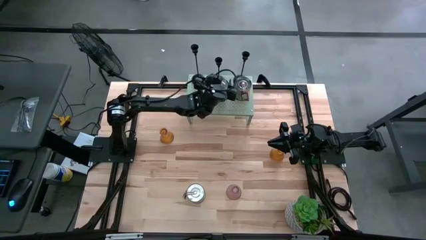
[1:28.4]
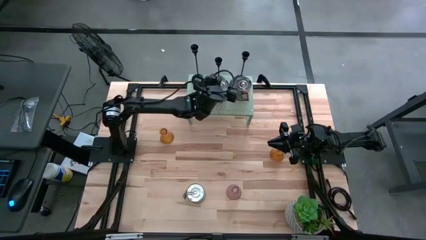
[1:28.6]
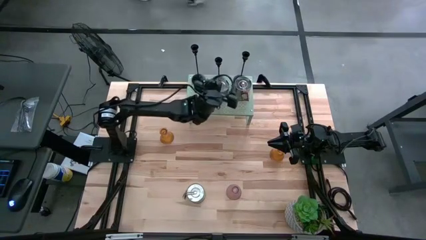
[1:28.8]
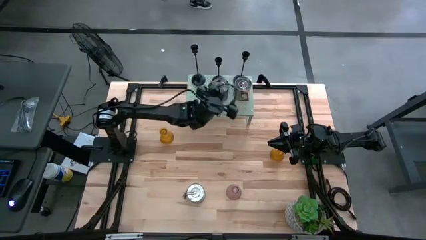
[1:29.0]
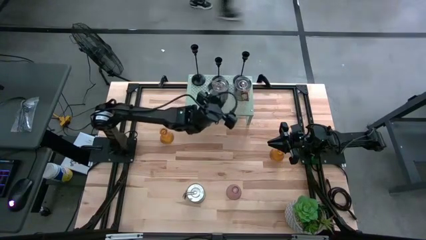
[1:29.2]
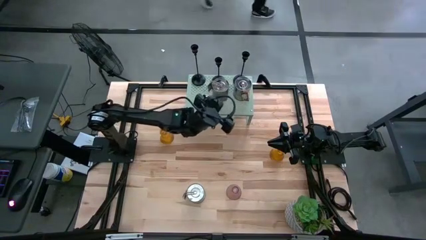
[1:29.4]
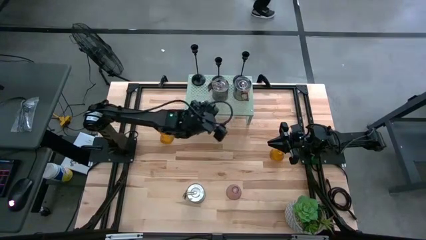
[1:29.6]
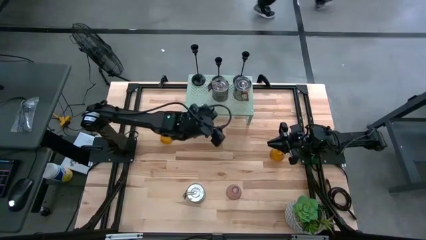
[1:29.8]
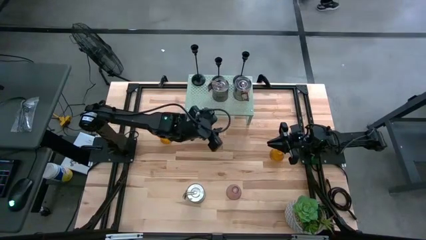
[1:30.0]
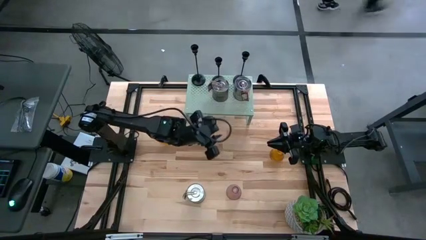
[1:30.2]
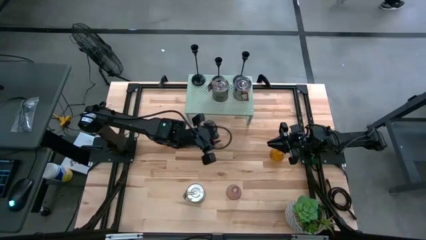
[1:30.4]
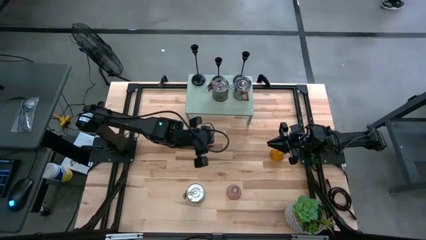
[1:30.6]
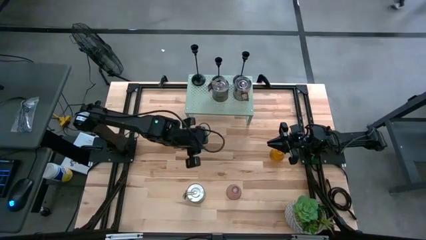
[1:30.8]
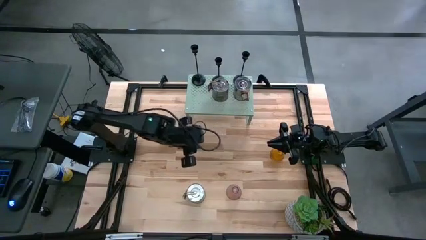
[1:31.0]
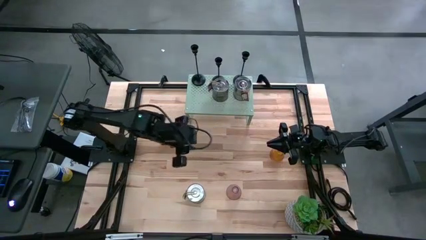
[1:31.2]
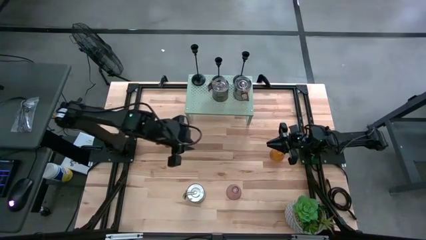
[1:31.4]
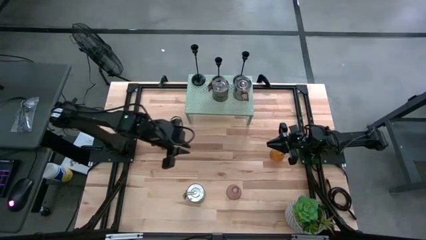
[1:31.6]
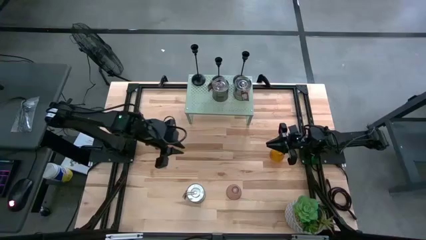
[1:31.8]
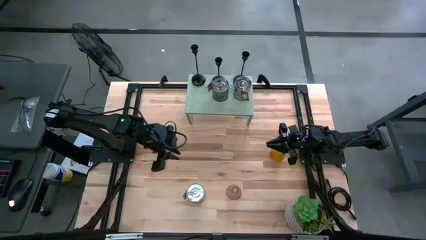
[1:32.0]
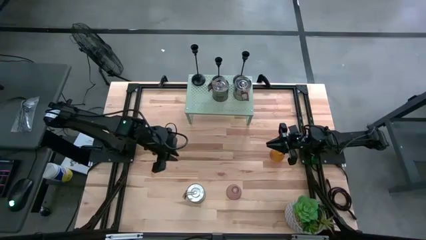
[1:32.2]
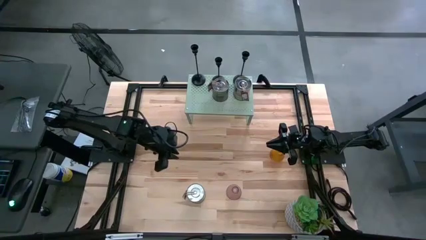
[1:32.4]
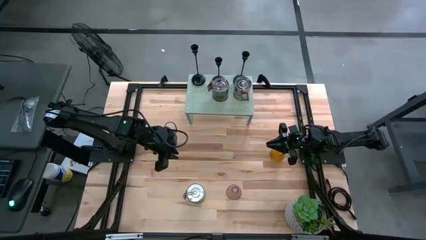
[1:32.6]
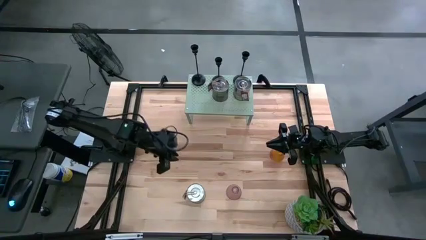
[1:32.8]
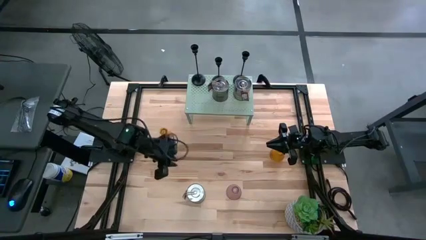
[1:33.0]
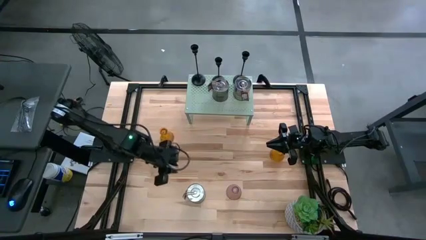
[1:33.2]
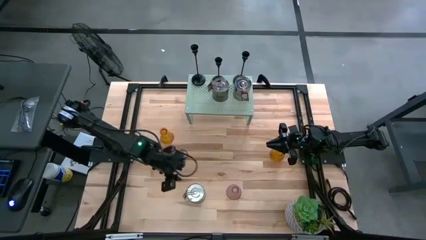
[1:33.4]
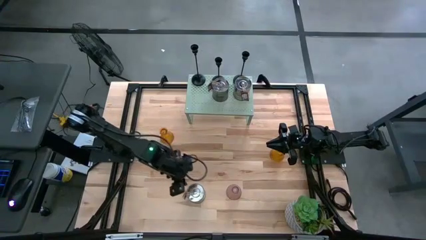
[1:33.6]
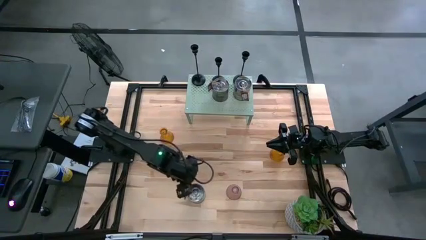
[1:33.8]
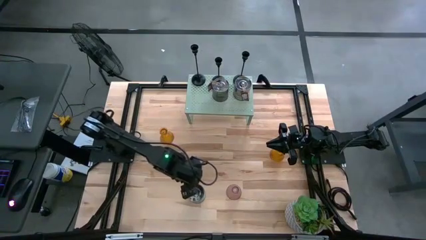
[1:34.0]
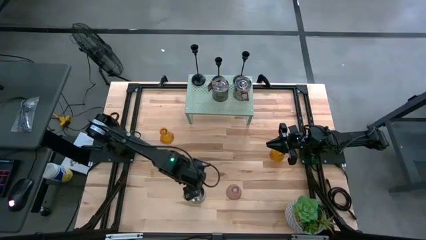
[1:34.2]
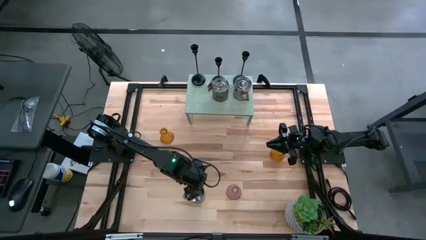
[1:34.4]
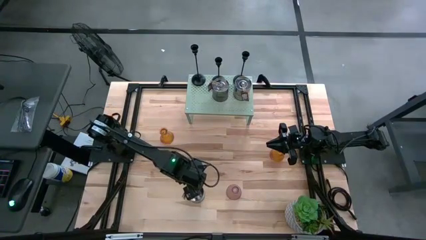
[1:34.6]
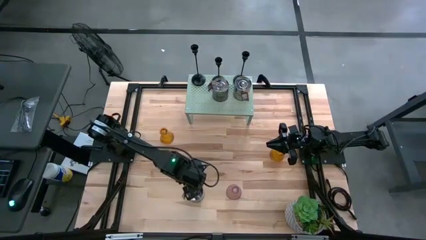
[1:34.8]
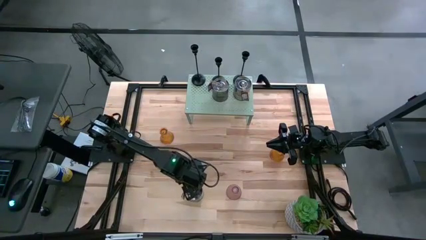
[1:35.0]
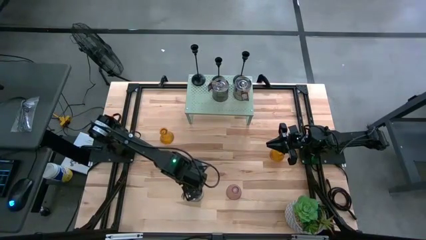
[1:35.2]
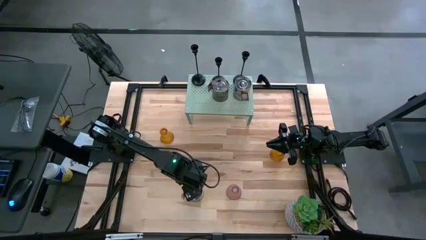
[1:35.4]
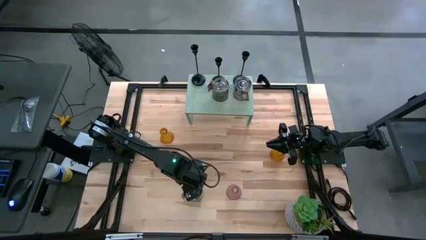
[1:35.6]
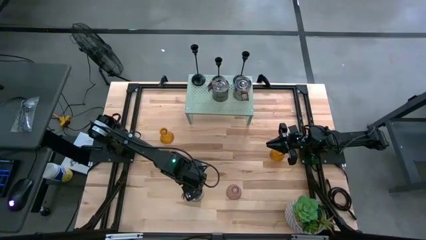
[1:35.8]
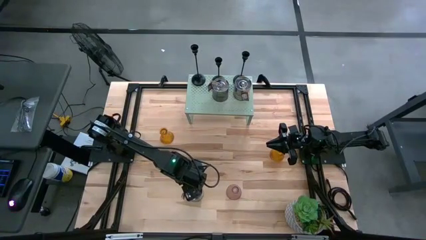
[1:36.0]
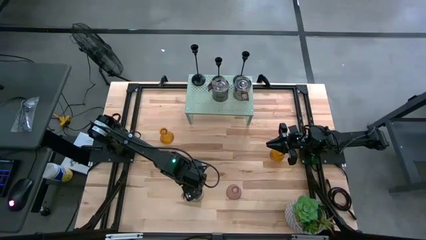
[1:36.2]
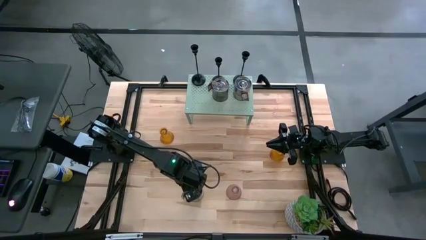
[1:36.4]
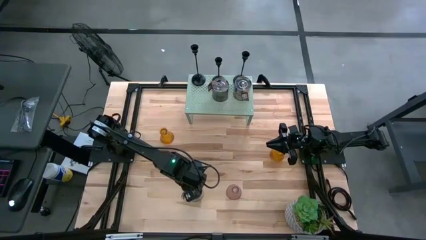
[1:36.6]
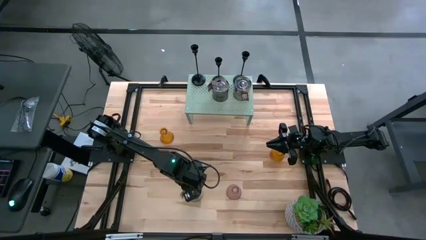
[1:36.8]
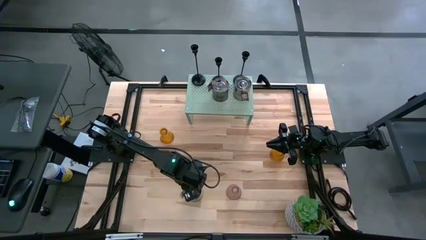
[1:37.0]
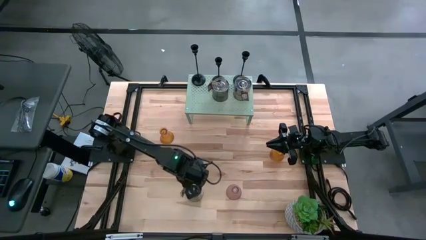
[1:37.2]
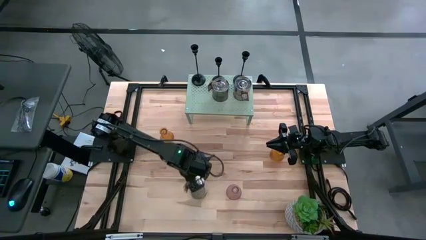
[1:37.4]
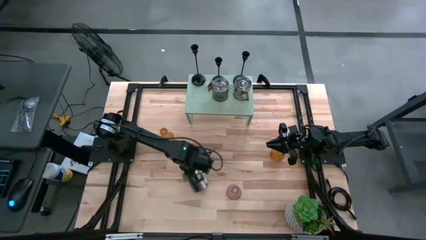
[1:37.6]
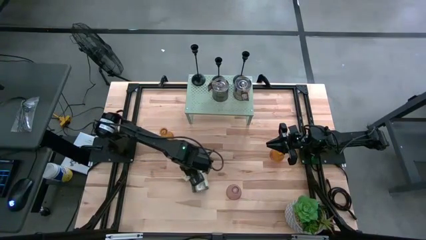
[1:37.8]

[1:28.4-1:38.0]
Task: Pick & Place candle stick holders
Put the scented candle on the shelf

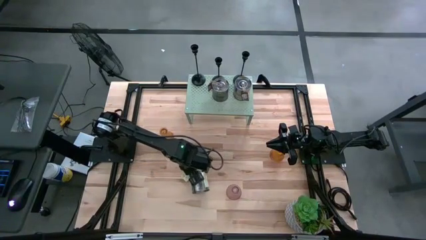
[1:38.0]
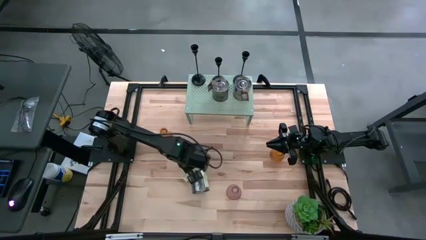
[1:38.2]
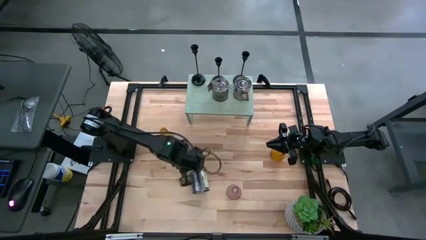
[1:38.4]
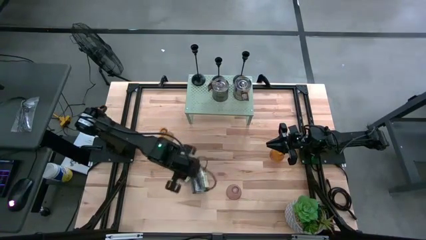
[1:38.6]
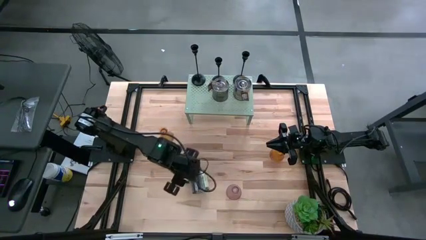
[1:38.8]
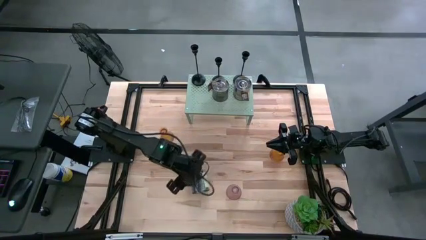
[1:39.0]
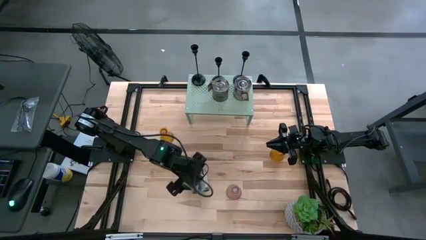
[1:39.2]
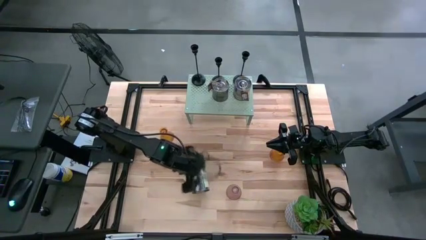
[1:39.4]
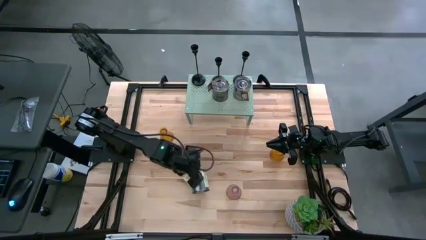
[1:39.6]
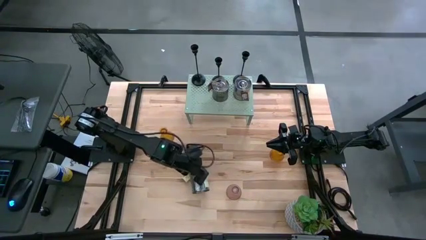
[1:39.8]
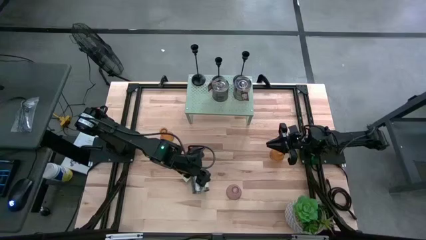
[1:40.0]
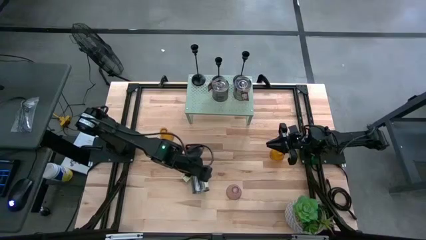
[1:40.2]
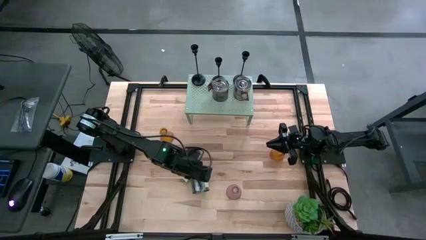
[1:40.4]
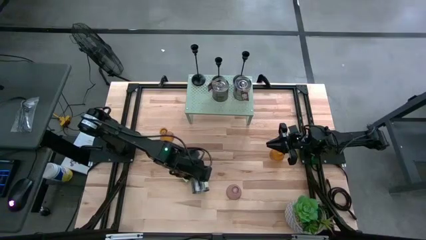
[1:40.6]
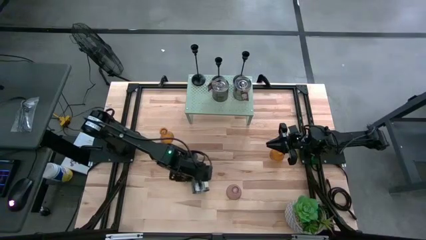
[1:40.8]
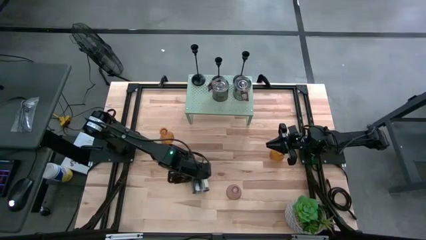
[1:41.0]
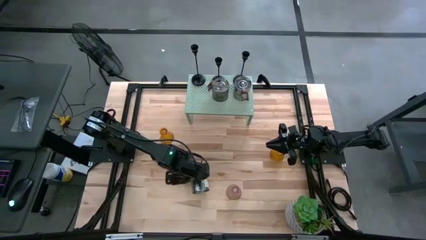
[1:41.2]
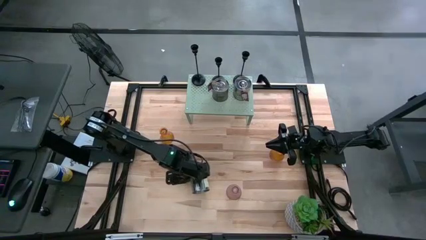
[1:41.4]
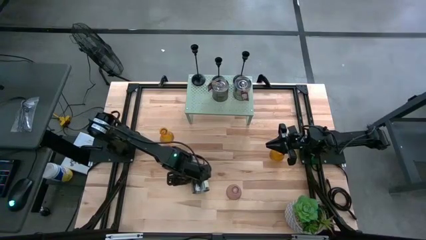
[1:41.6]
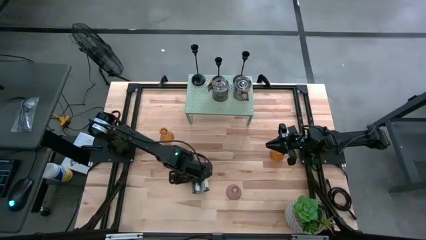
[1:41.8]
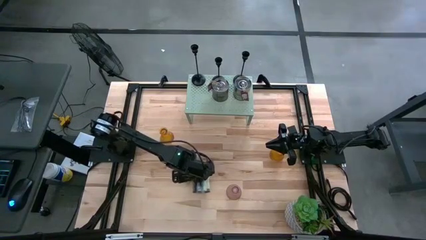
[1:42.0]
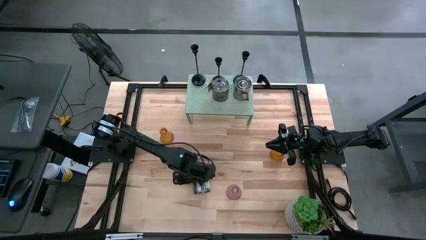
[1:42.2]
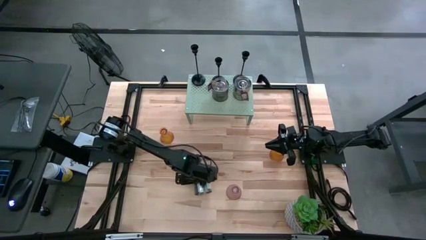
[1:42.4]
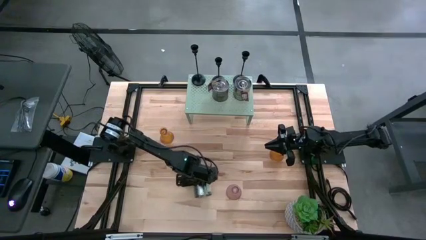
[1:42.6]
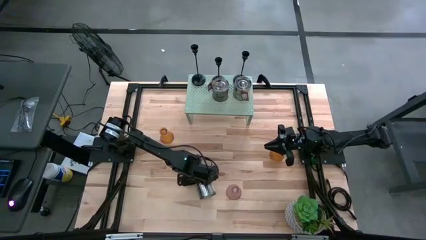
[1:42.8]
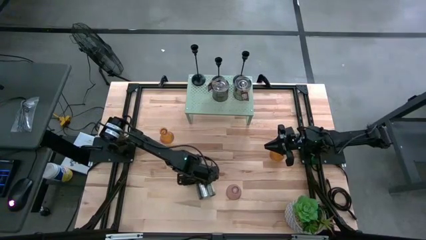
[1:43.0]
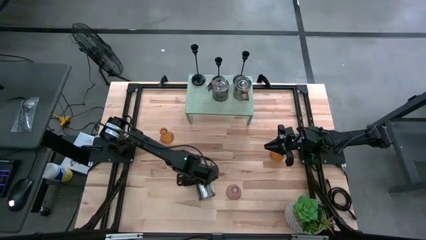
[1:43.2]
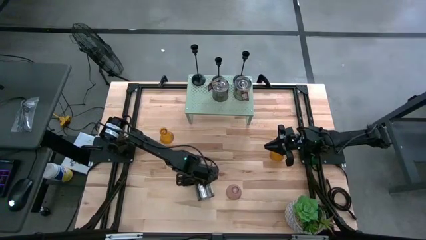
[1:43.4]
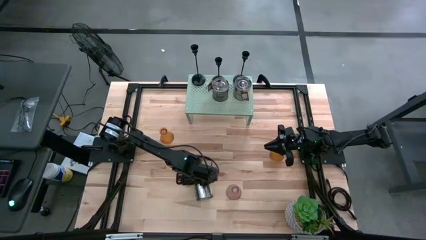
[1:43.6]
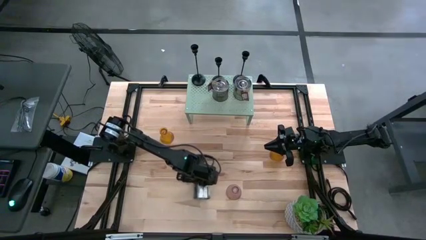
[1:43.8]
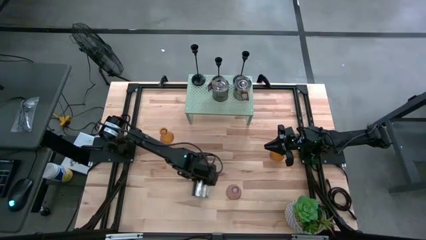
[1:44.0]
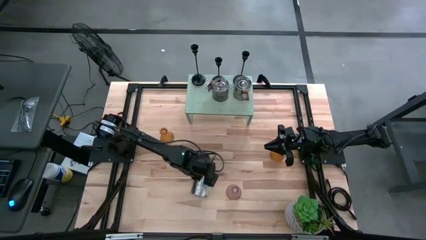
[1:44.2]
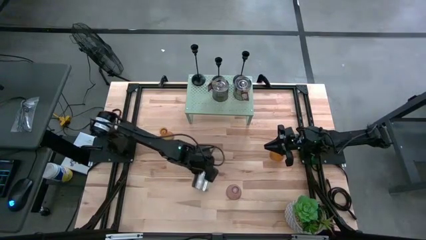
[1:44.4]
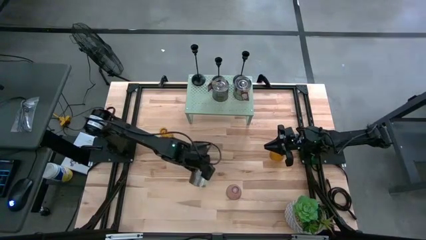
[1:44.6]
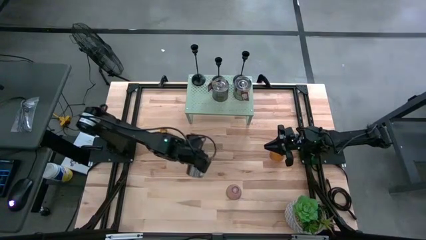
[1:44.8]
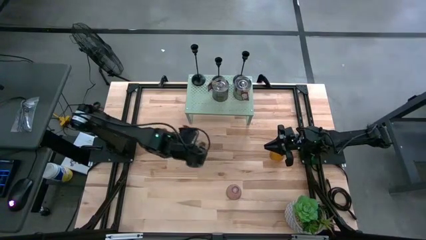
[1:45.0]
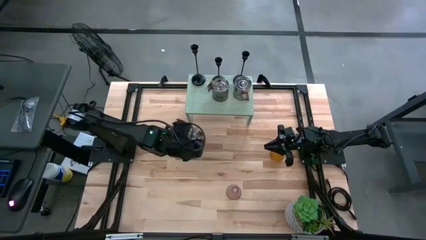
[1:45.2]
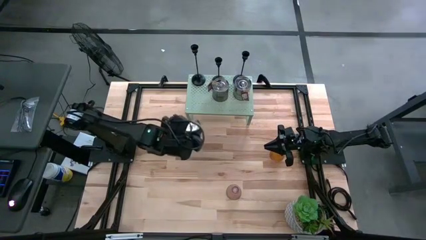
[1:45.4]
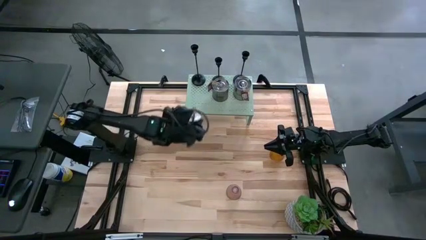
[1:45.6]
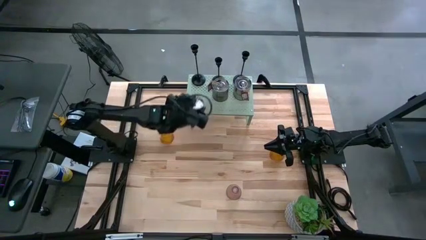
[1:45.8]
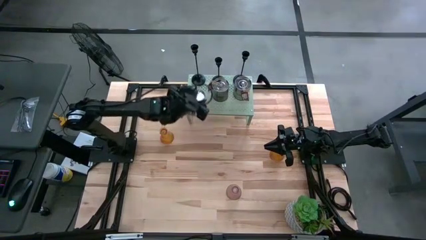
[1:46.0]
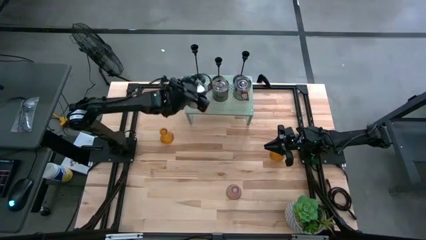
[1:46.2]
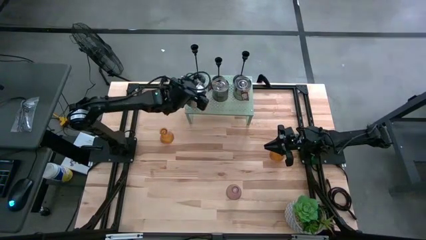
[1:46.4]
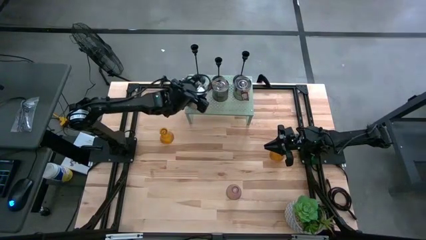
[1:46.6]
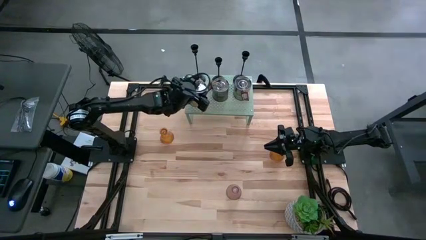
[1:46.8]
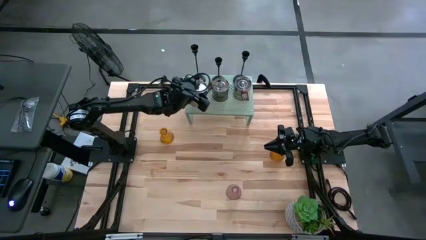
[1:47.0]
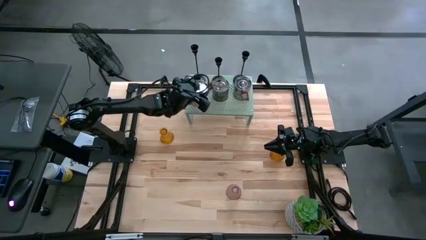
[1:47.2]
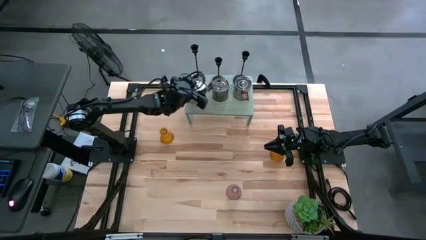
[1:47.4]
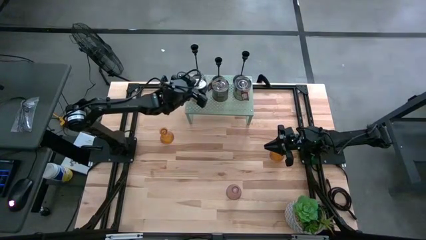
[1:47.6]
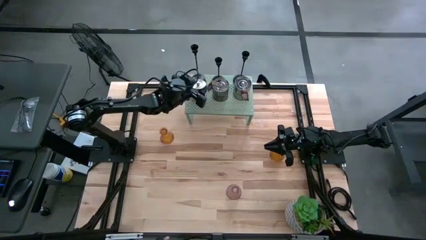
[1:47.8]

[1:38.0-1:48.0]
Put the scented candle on the shelf
